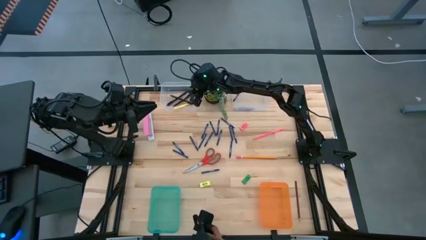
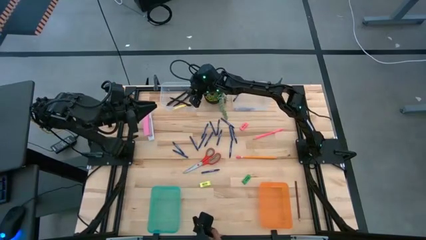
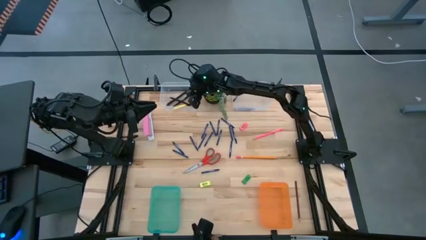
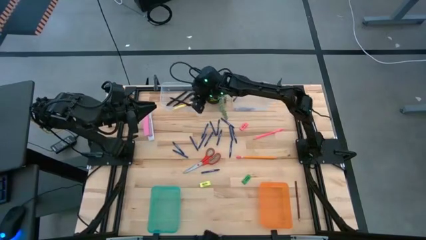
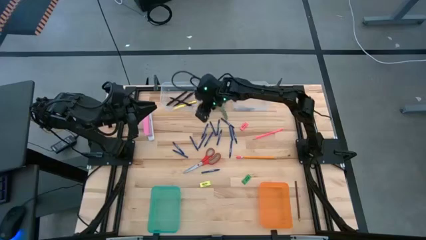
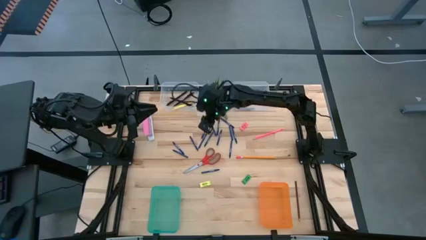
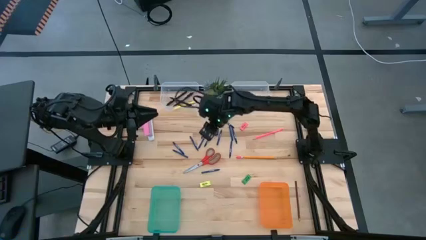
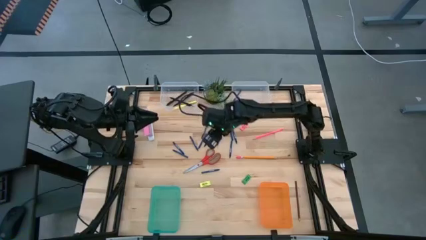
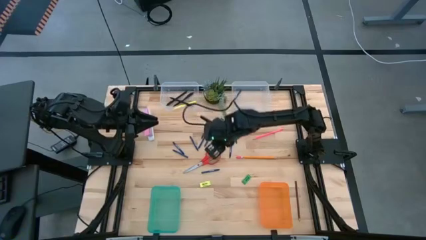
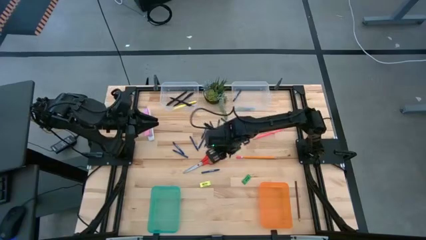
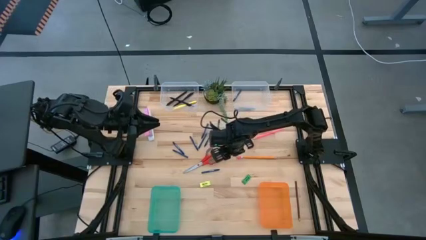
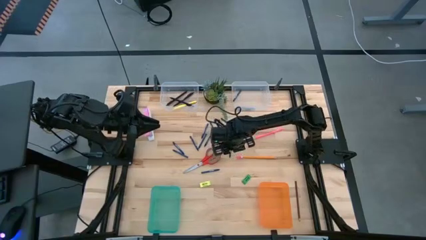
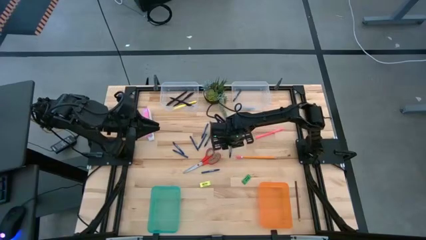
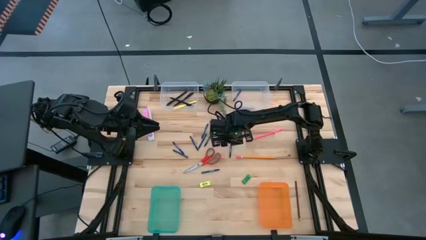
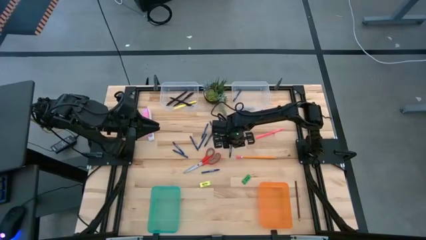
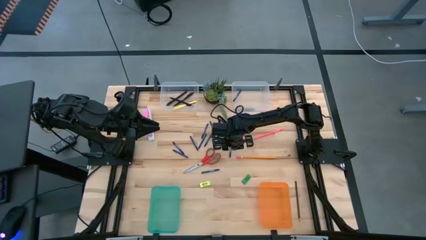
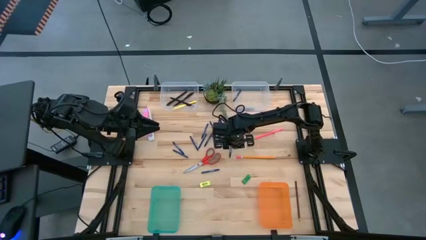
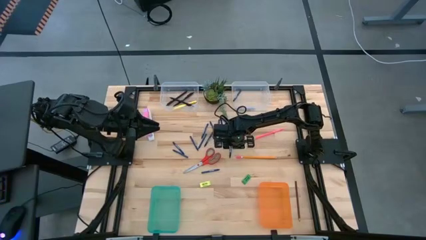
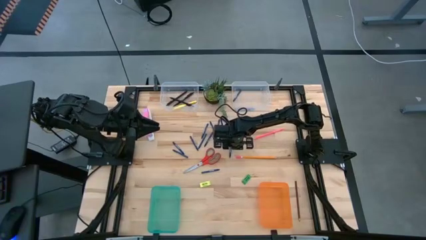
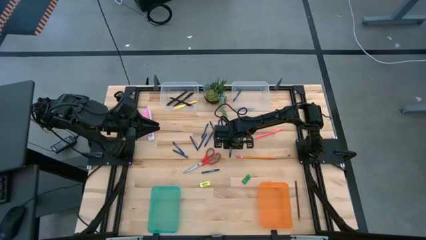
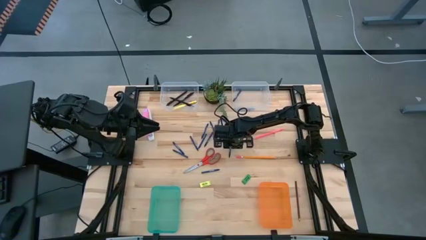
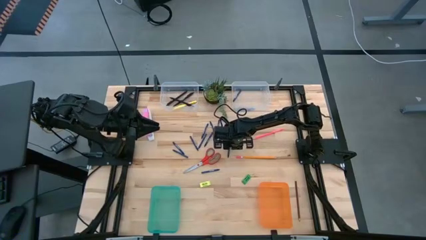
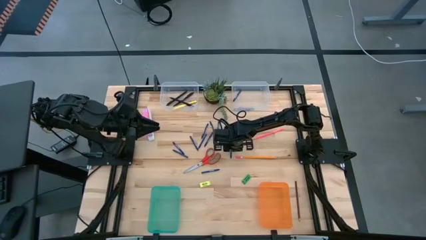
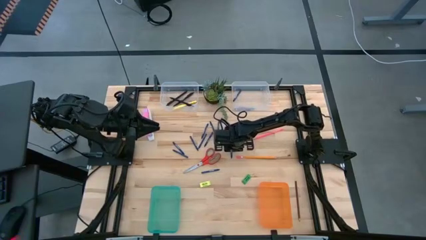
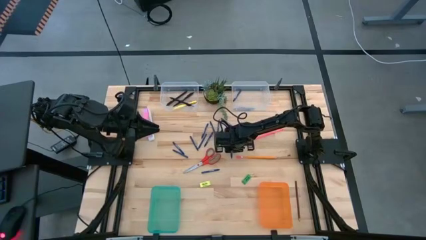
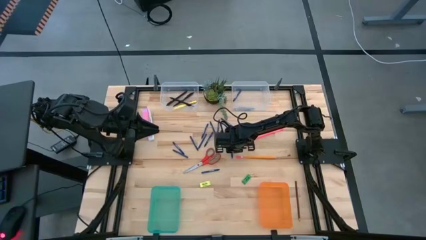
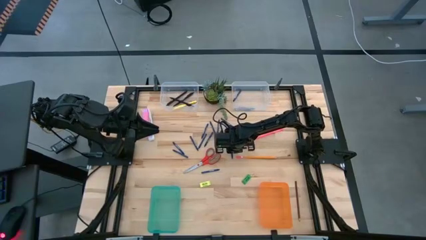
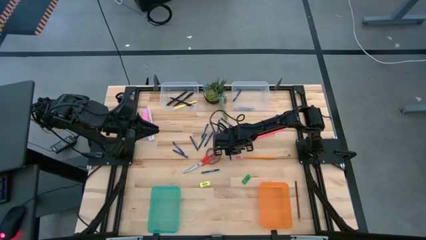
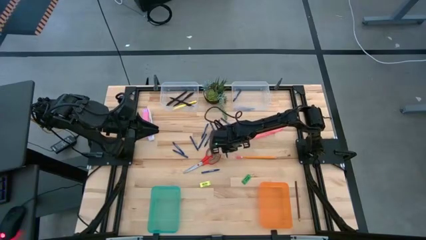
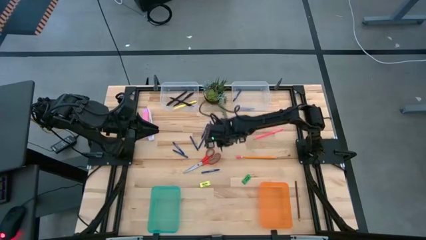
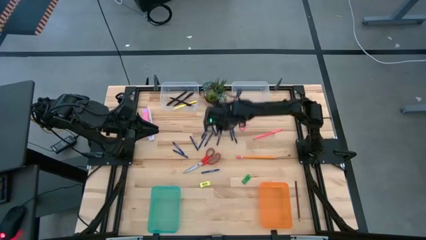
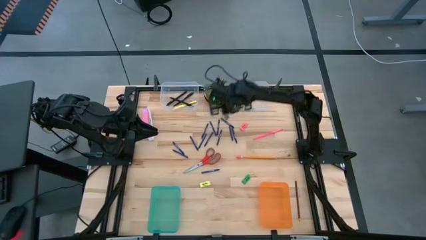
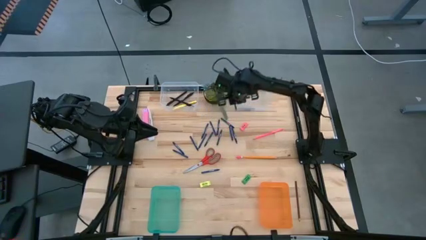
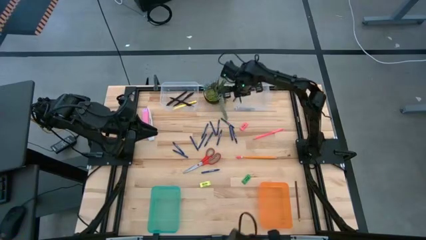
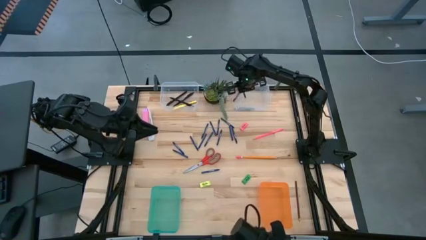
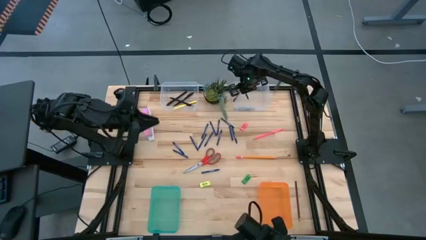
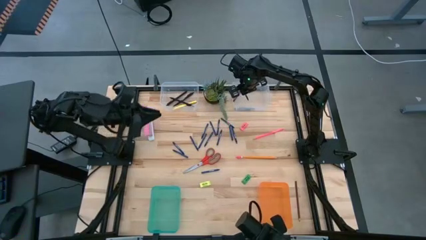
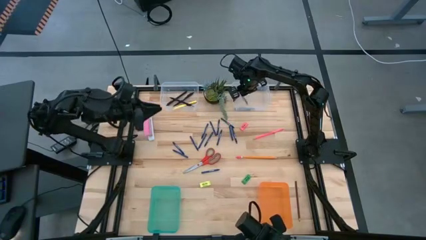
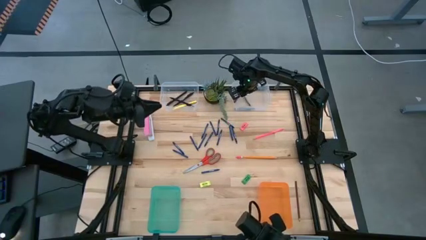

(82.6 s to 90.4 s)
Task: Sort crayons/erasers/pens/pencils in bins
Put the blue crayon into the right transparent bin

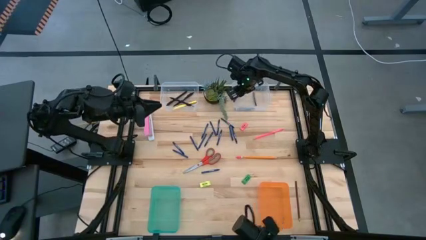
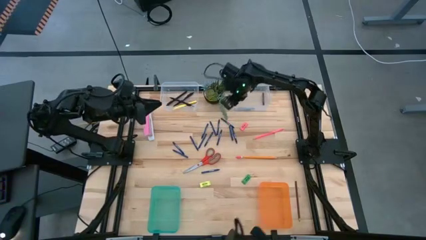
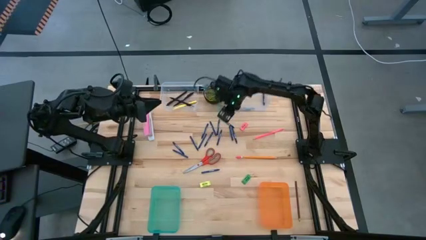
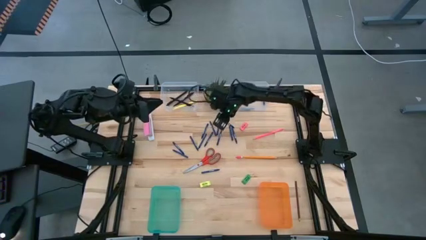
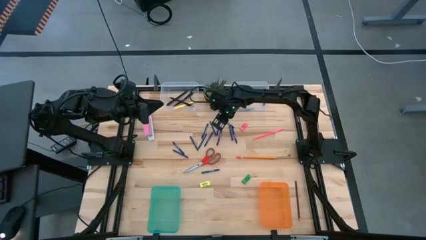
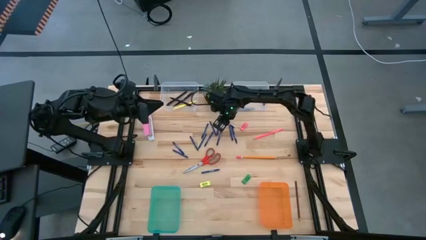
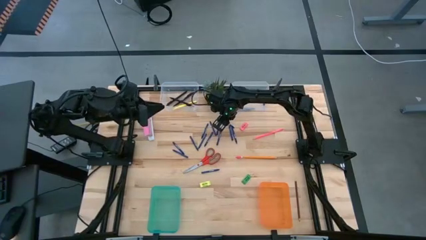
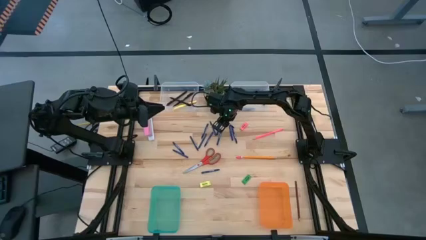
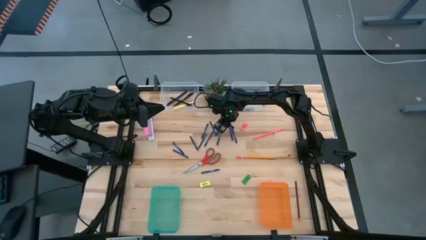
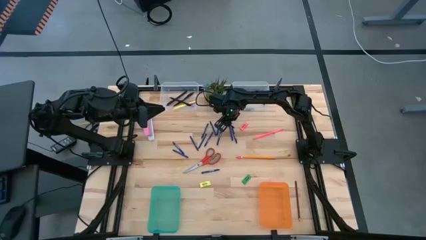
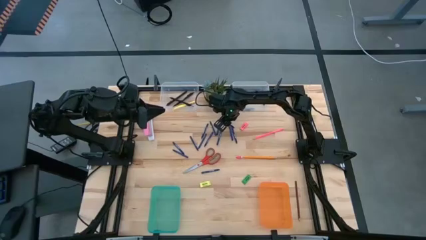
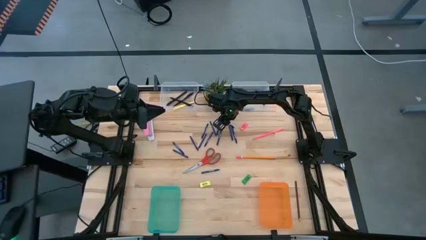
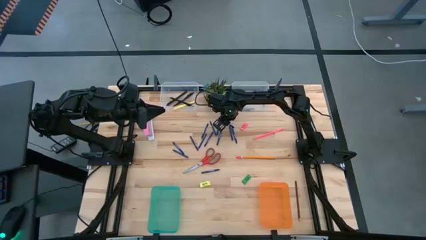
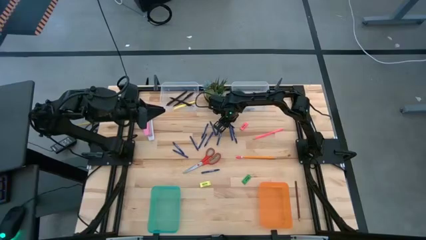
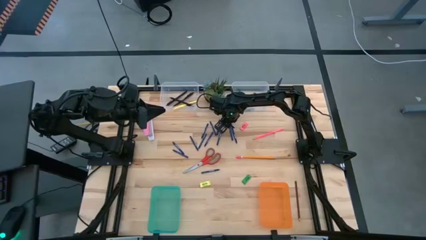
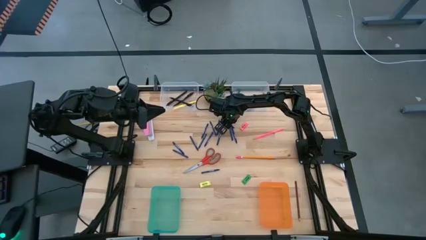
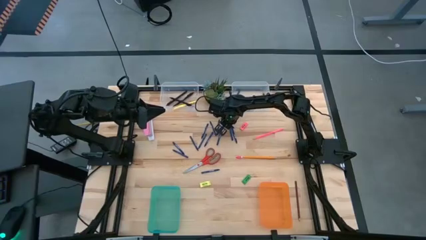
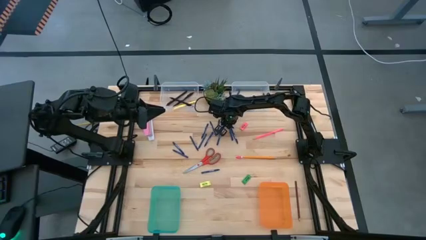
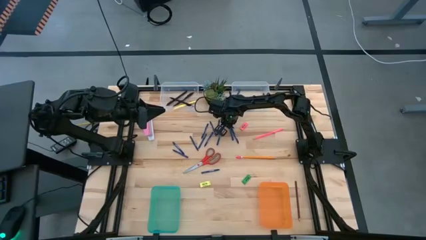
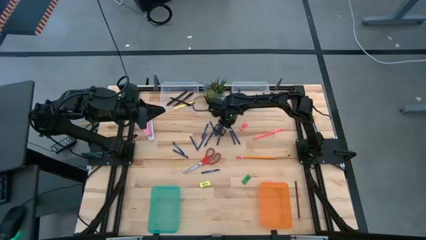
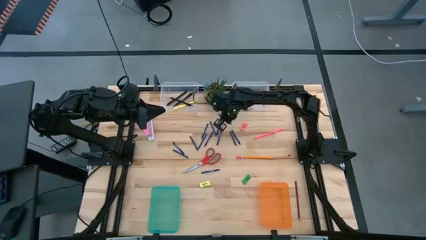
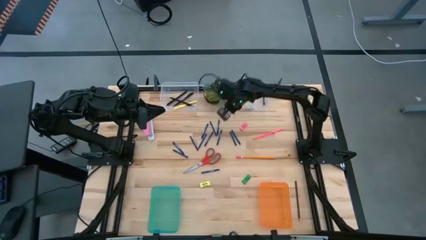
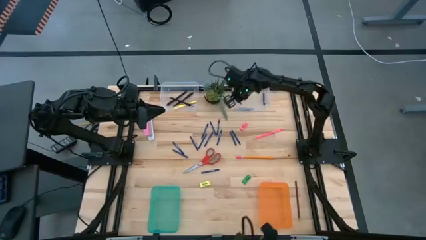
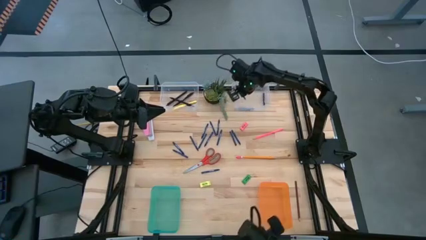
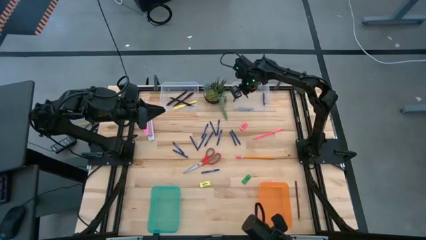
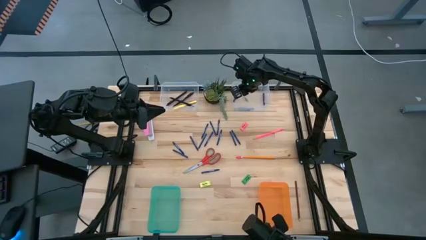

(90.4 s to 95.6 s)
Put the blue crayon into the right transparent bin

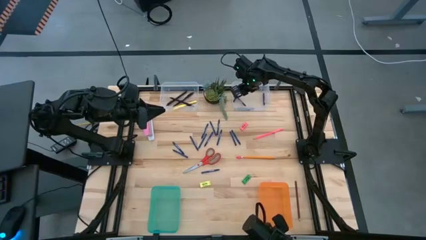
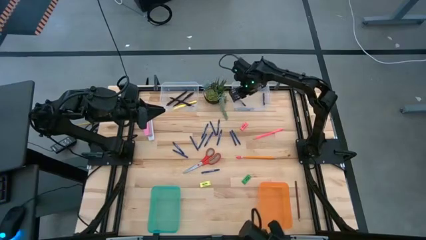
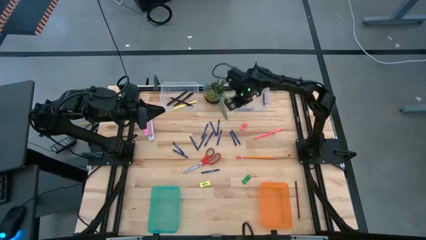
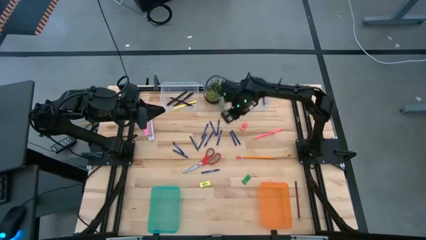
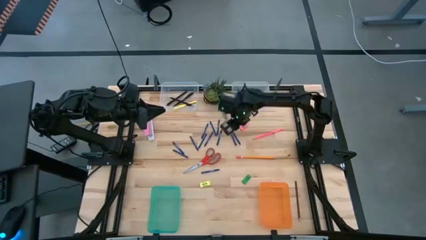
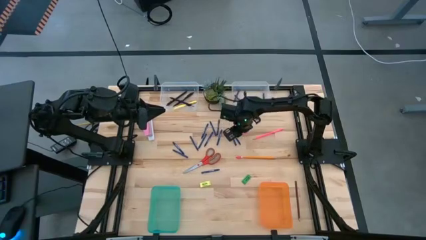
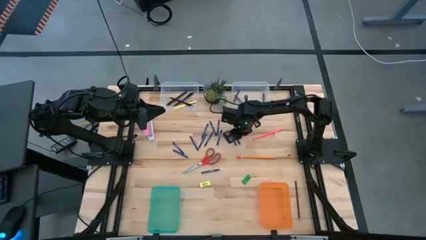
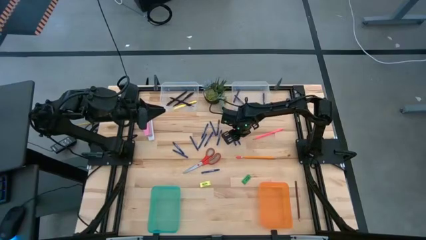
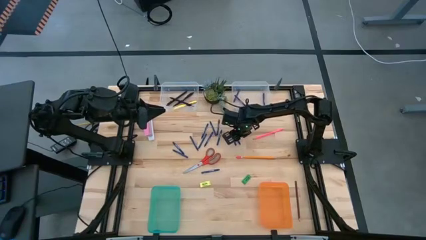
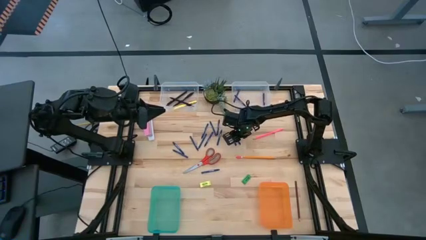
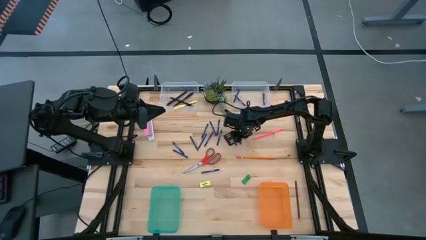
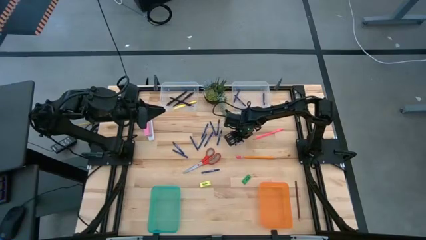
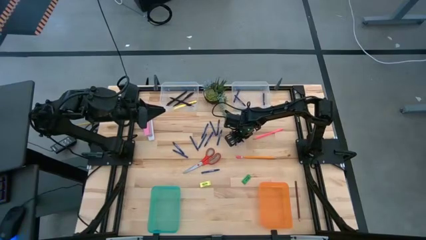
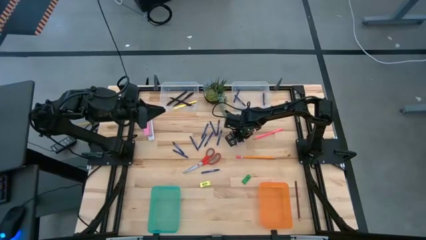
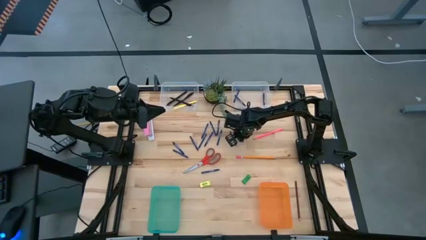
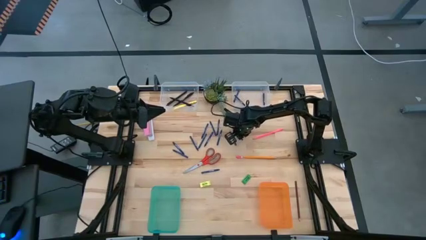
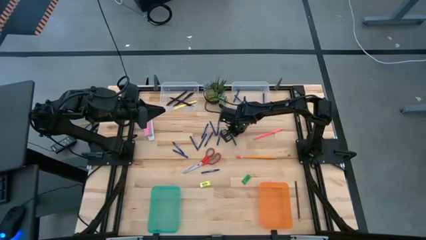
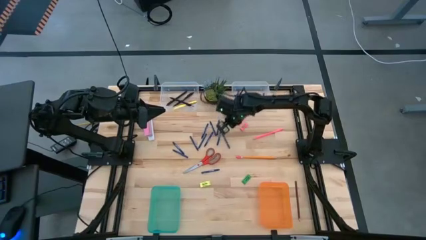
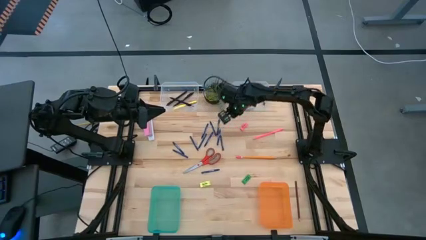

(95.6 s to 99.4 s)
Put the blue crayon into the right transparent bin
